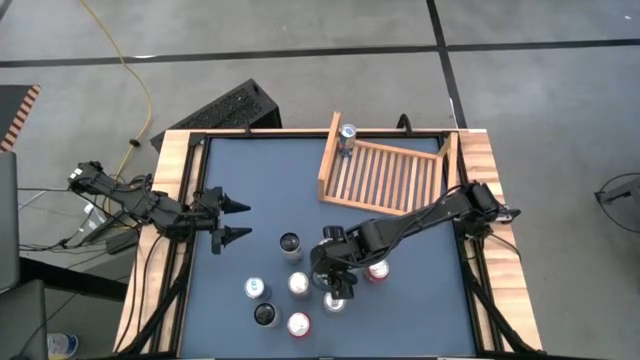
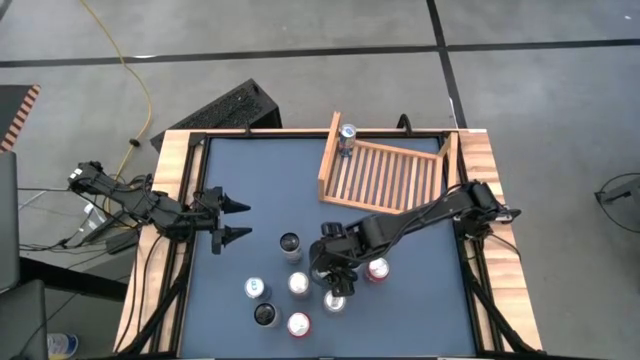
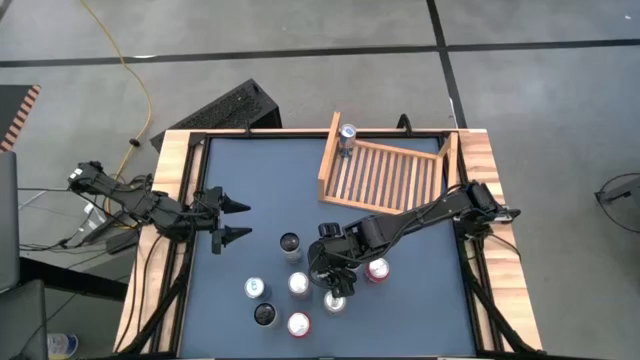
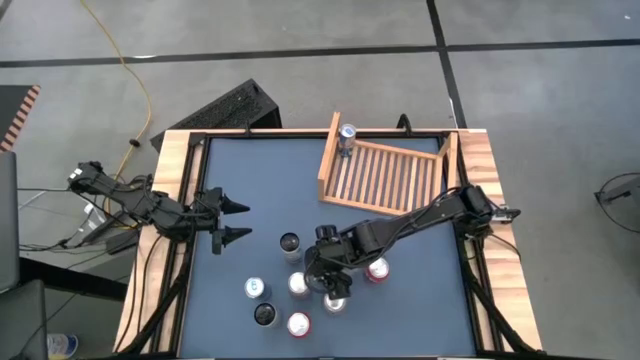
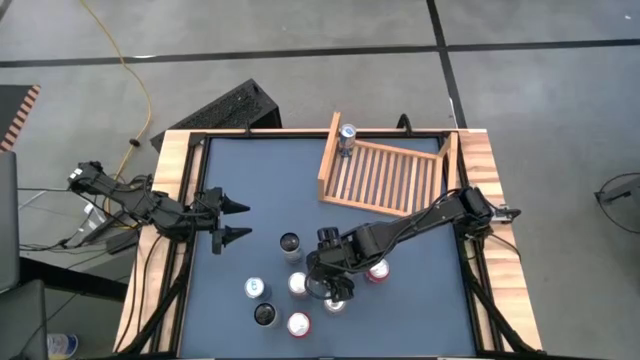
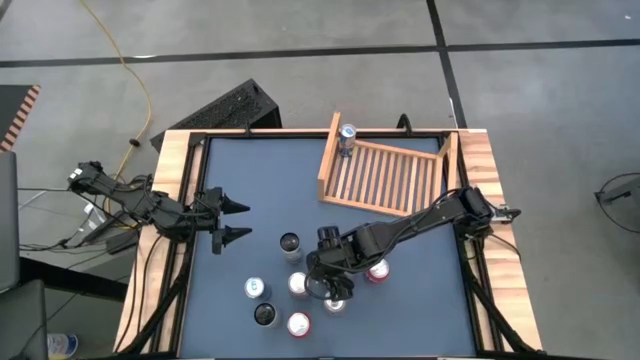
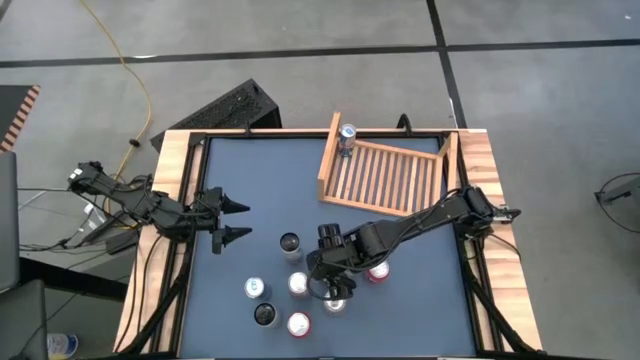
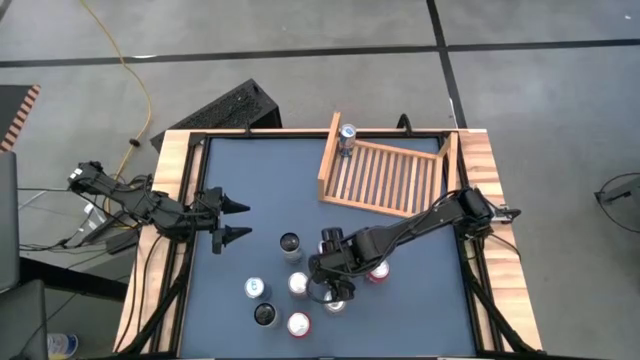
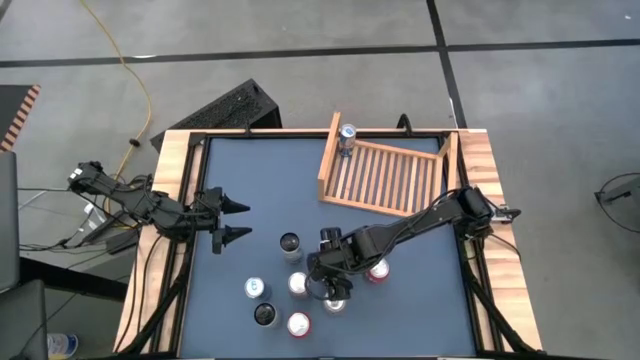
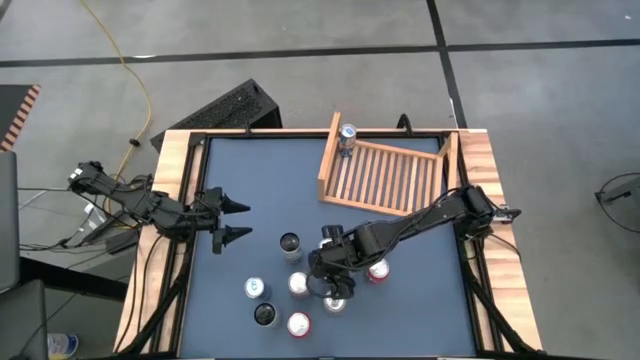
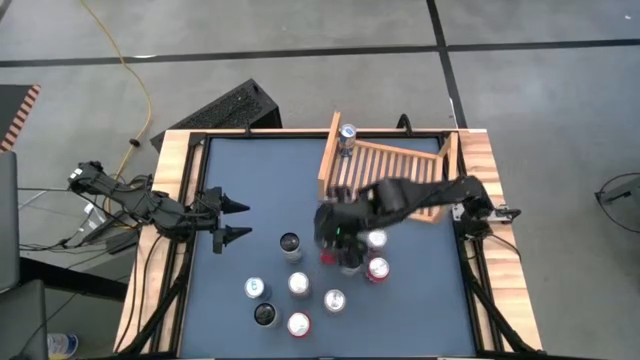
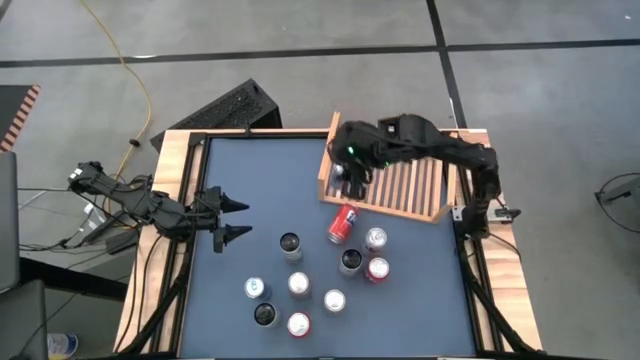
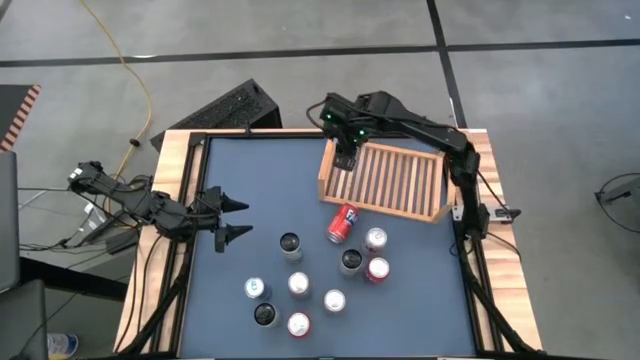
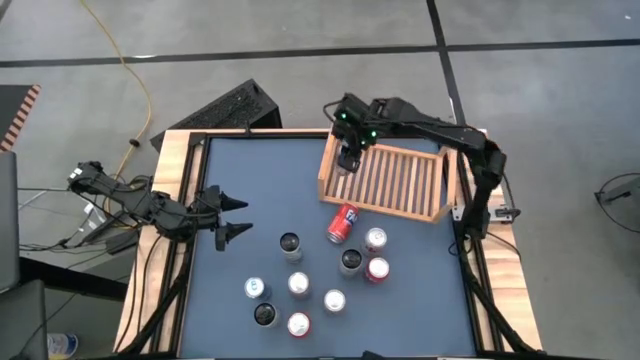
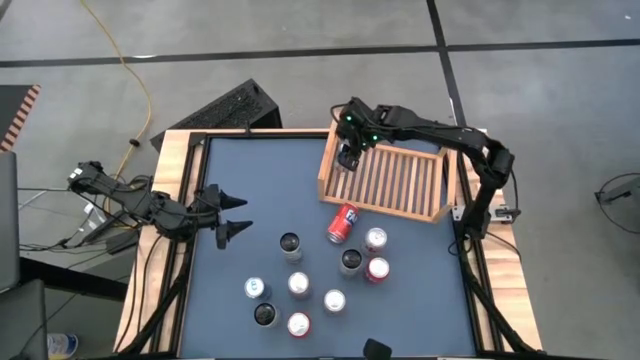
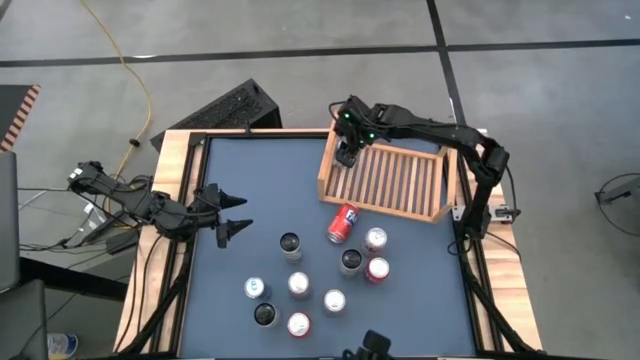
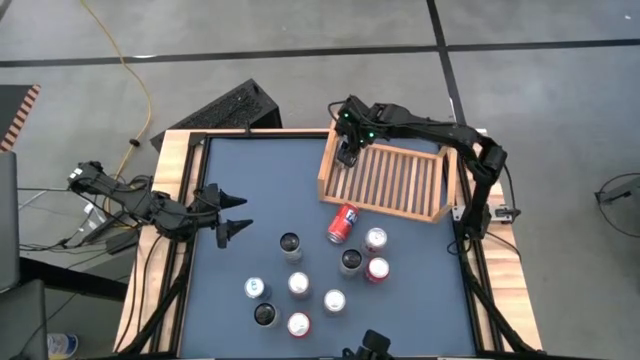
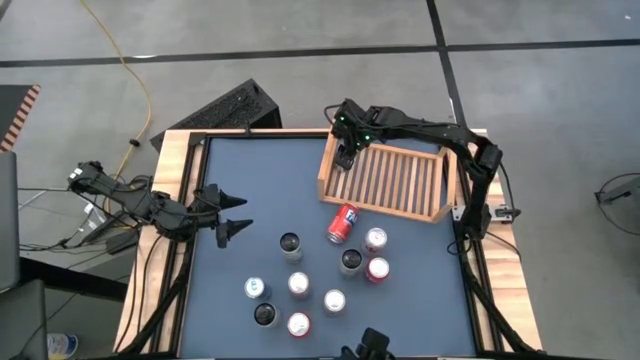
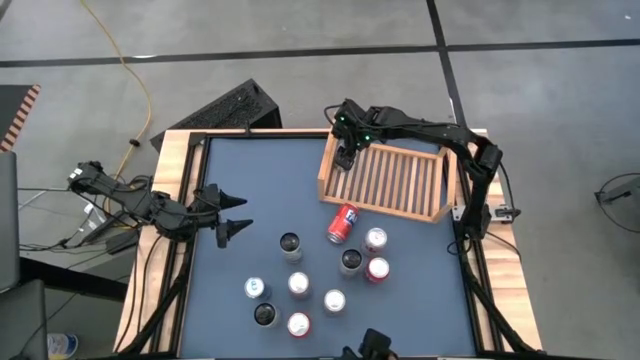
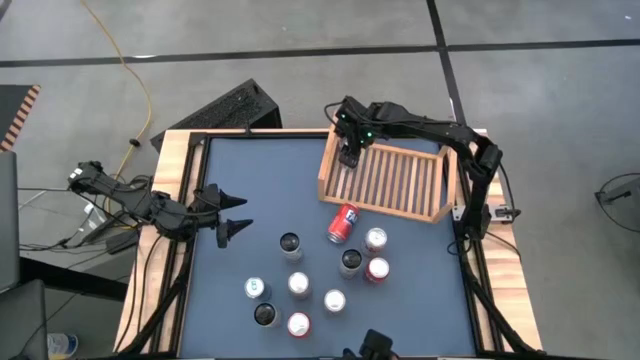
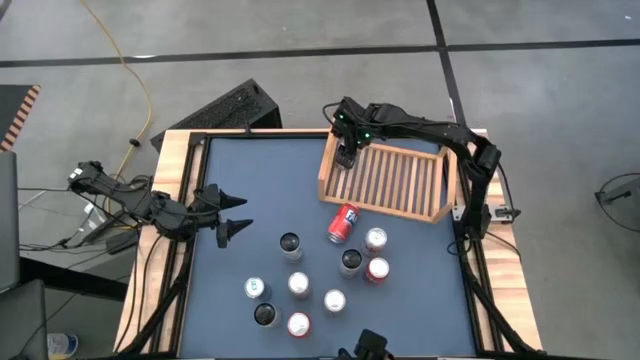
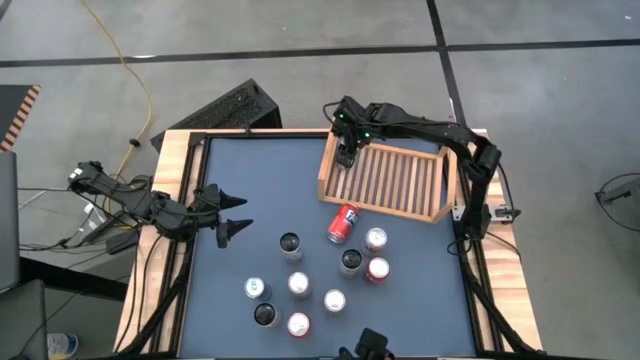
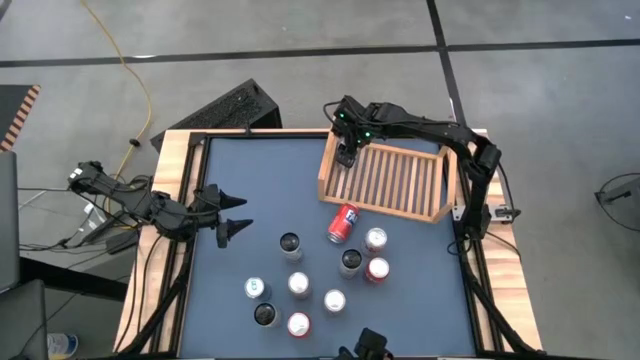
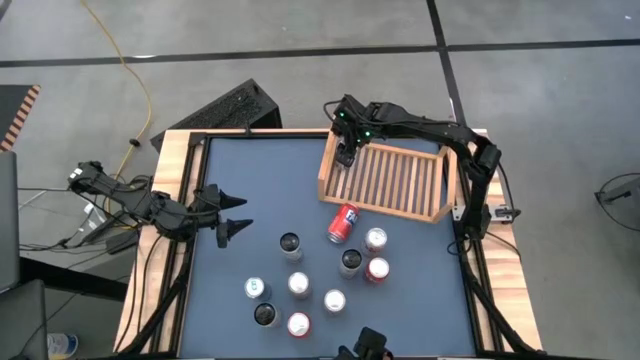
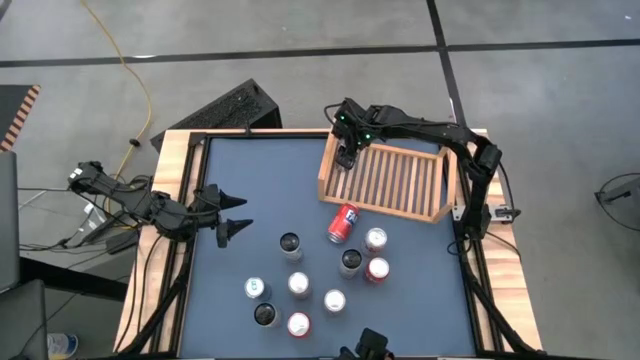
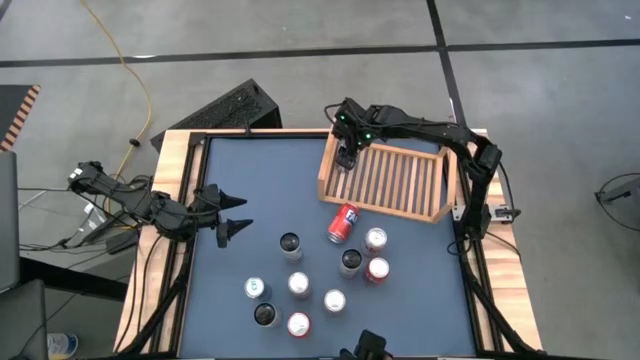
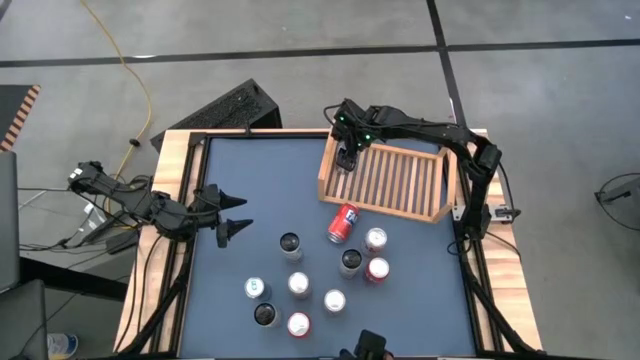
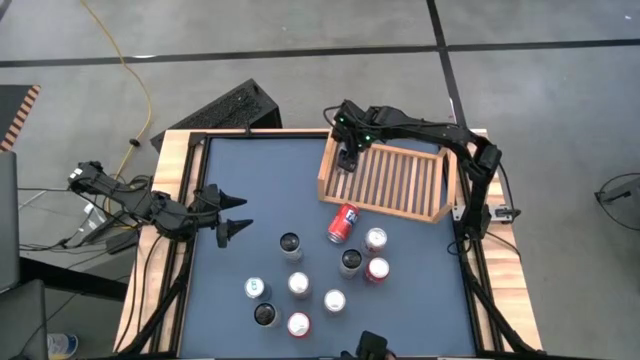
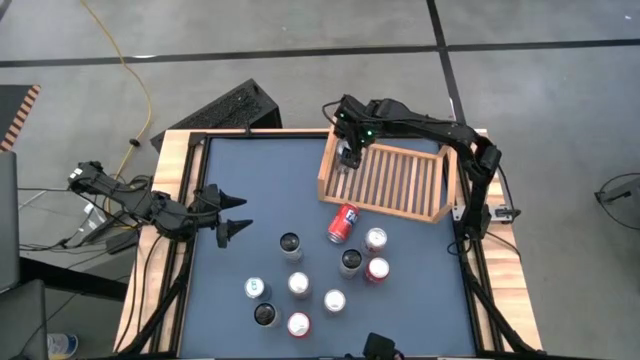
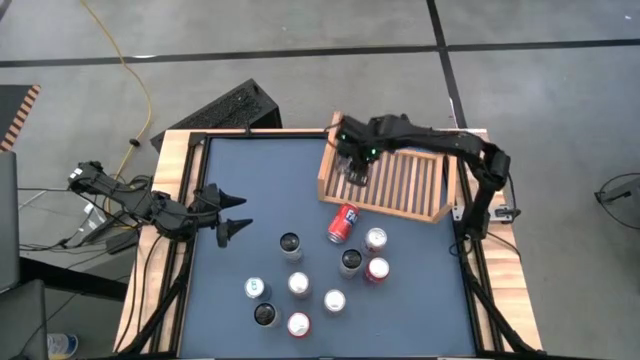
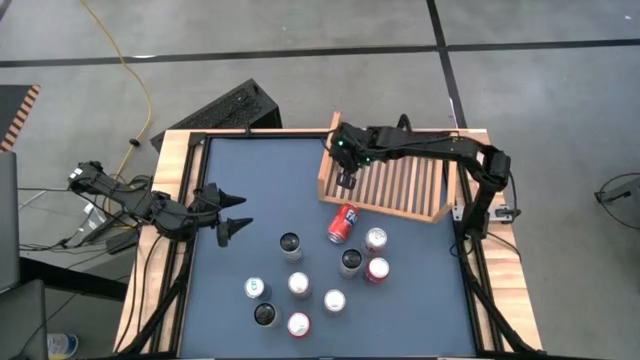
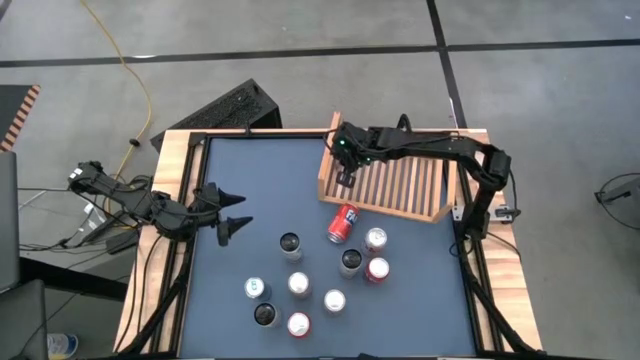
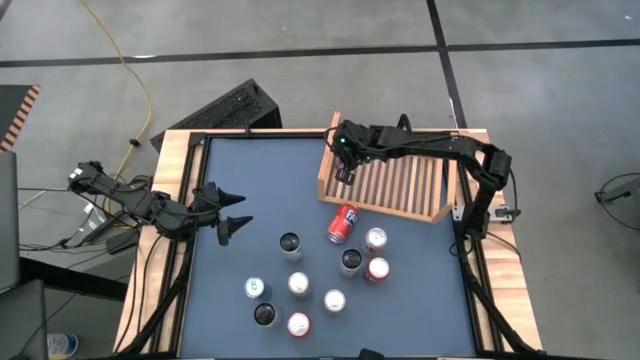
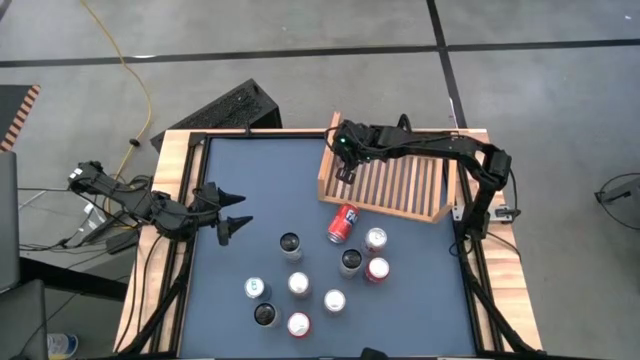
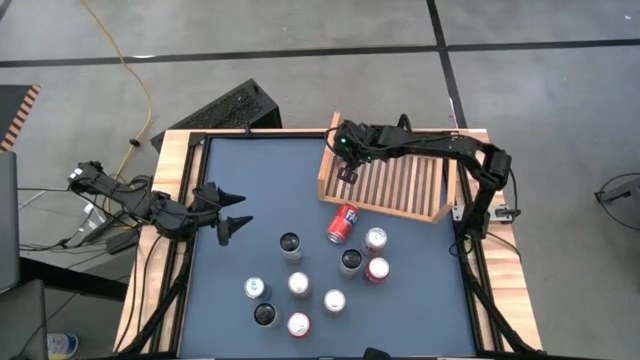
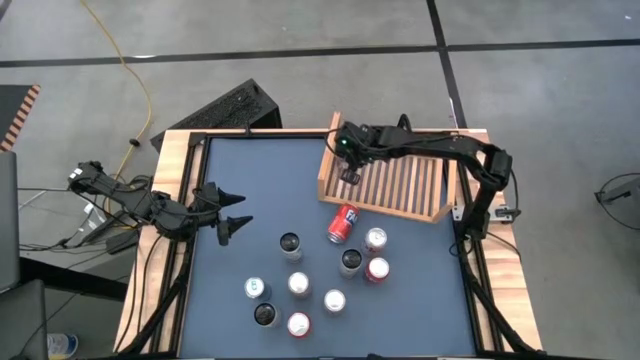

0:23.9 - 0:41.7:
Task: Place canned beverage on shelf
Put the right blue soda can aligned with the other blue soda can on the shelf
